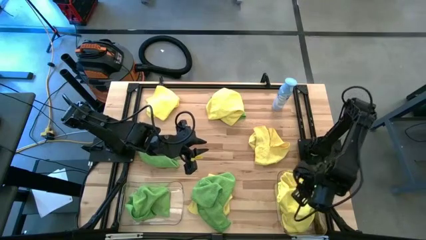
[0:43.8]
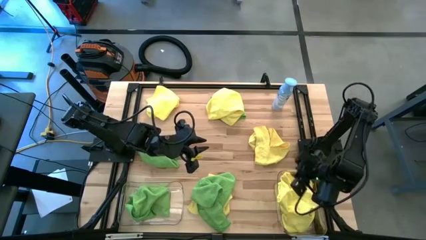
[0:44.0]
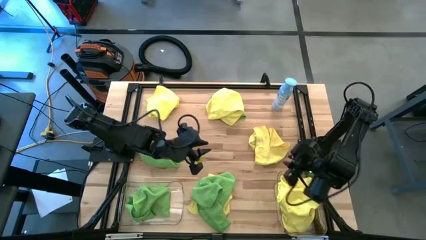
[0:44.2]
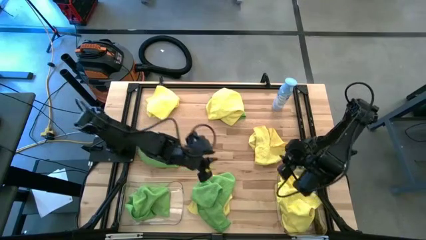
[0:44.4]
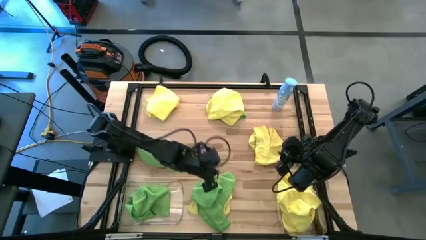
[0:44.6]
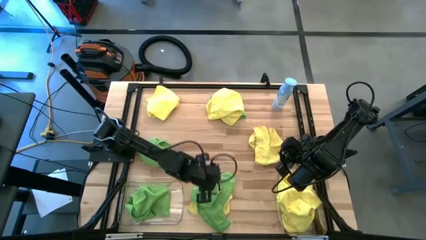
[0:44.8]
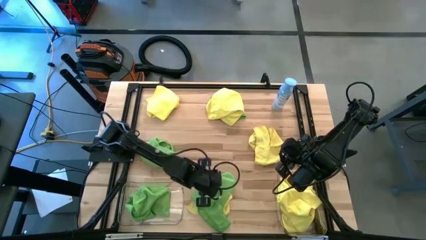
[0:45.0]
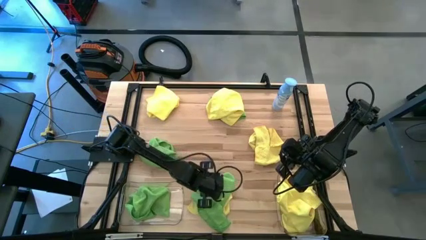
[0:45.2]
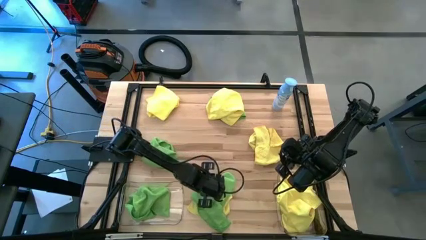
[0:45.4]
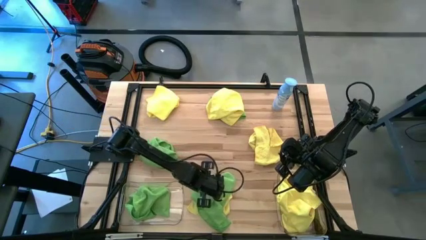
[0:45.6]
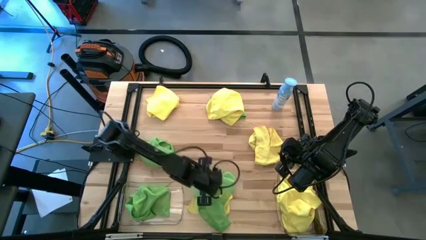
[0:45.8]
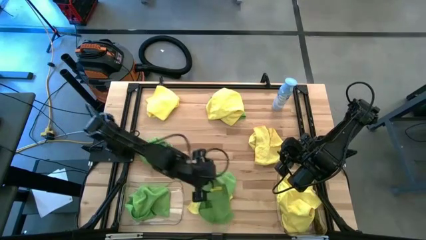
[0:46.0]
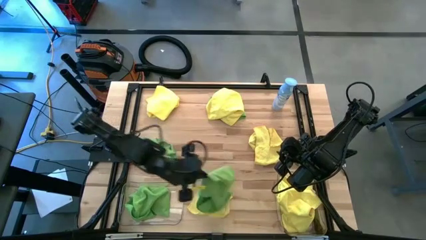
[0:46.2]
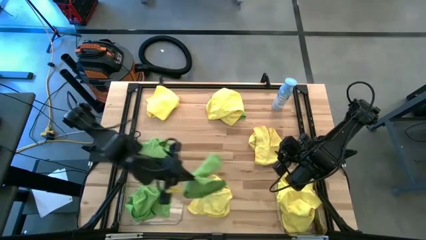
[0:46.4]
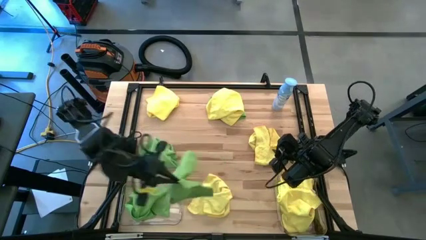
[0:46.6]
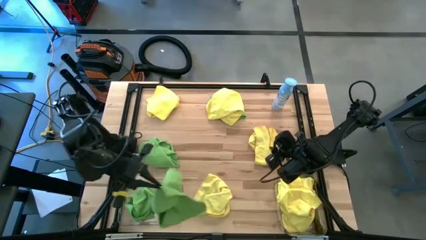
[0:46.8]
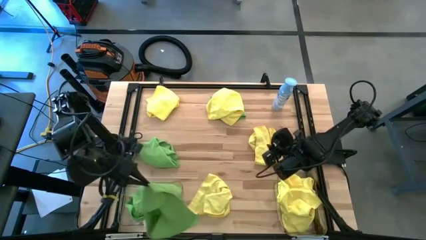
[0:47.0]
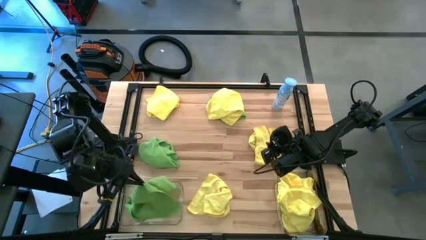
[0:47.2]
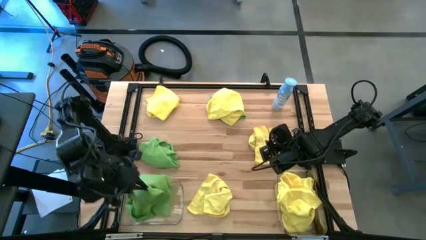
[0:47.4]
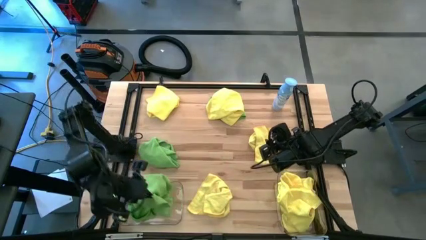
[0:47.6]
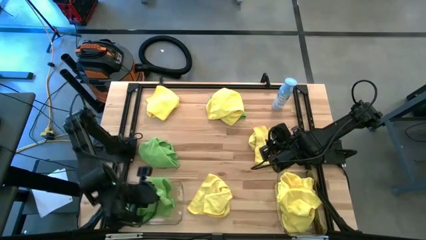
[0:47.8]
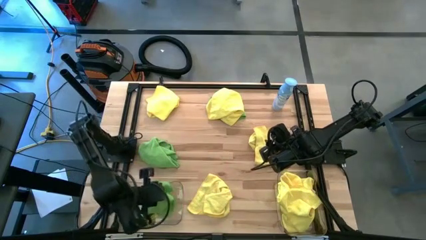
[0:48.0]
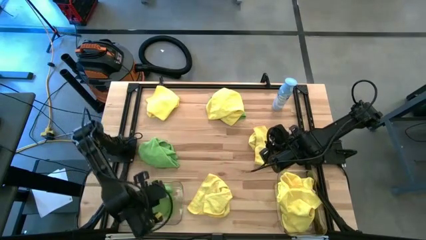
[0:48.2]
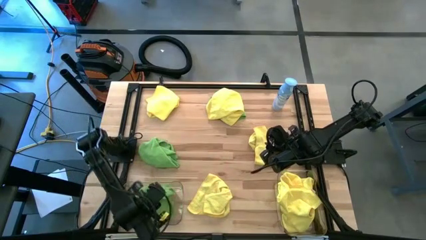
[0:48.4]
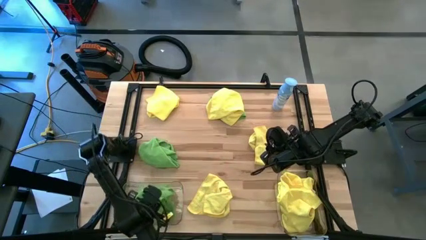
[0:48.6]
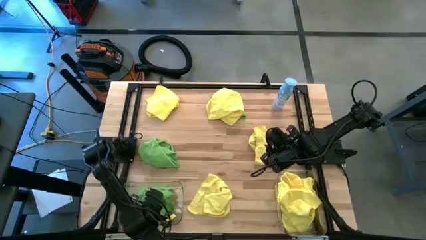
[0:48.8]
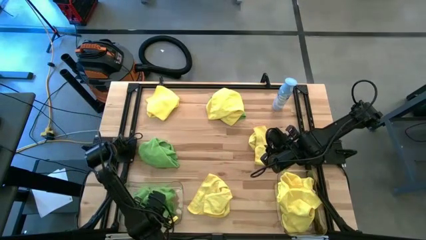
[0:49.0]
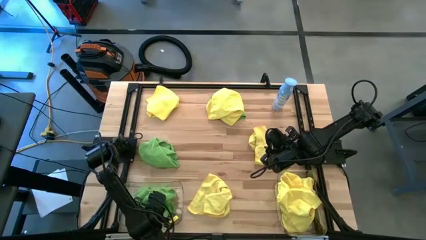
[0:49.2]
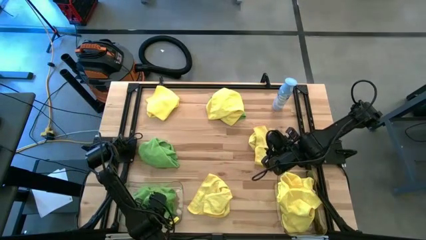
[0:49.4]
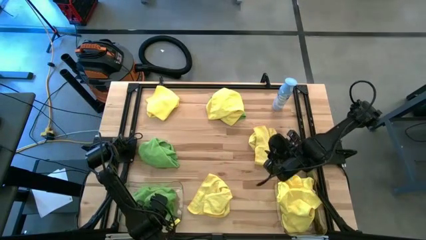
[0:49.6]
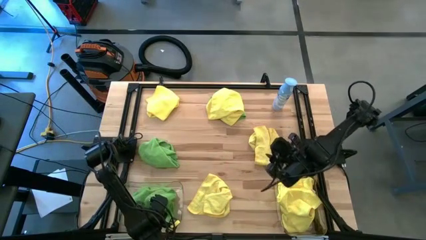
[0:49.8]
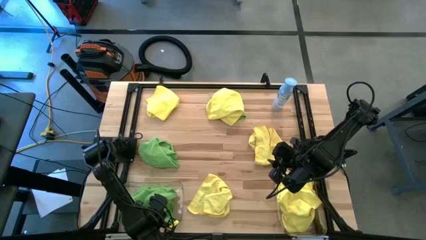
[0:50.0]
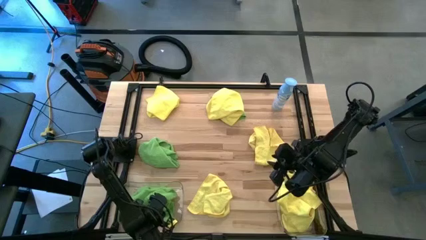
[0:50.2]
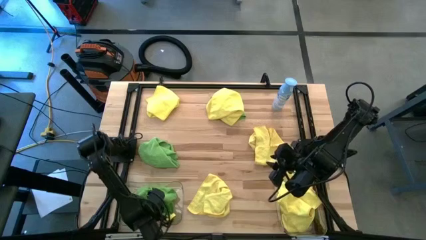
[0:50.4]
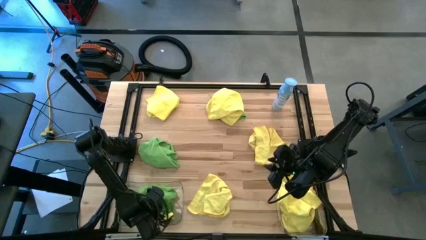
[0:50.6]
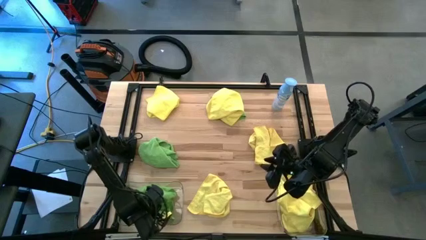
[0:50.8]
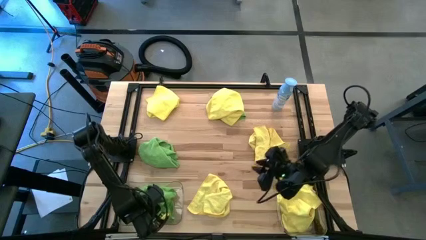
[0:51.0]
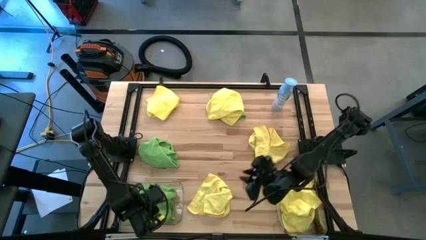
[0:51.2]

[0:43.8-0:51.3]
Task: Sort microfiber towel by color & place in baskets
Put the bottom center green microfiber towel into the left transparent bin

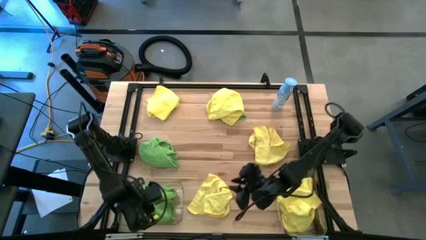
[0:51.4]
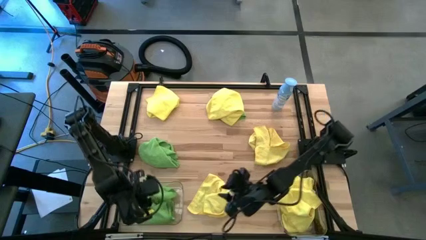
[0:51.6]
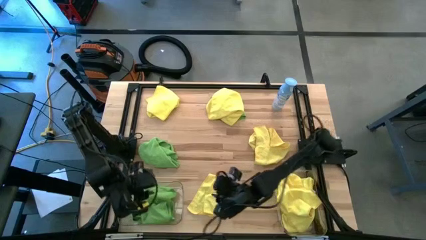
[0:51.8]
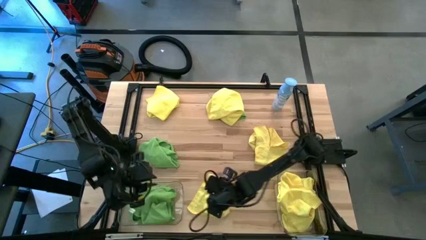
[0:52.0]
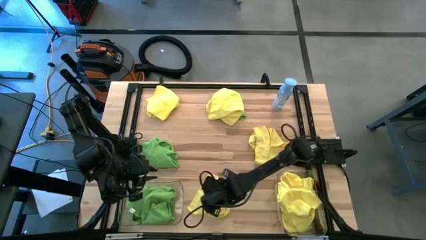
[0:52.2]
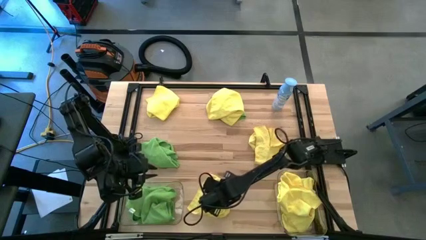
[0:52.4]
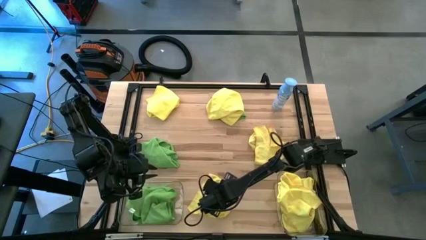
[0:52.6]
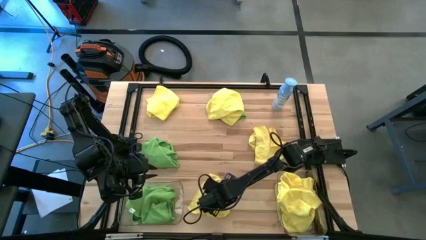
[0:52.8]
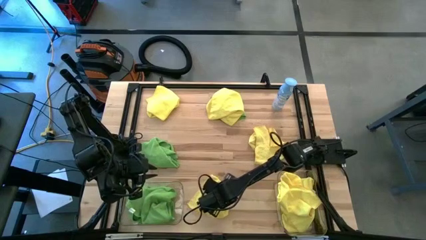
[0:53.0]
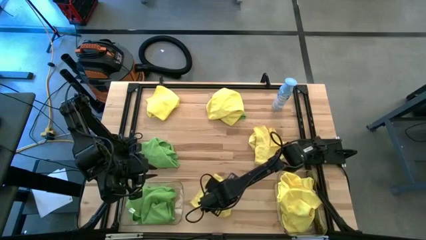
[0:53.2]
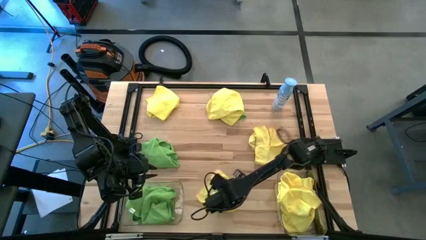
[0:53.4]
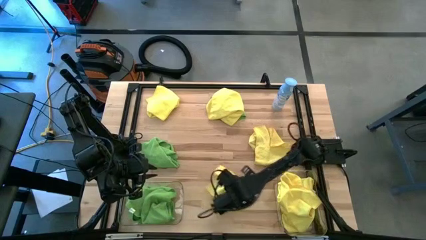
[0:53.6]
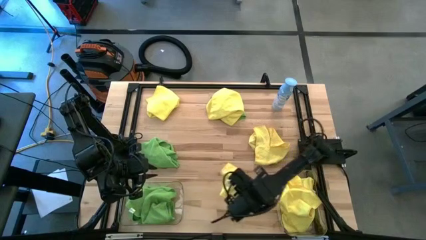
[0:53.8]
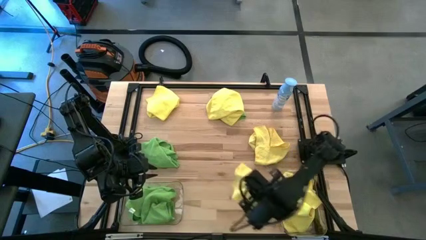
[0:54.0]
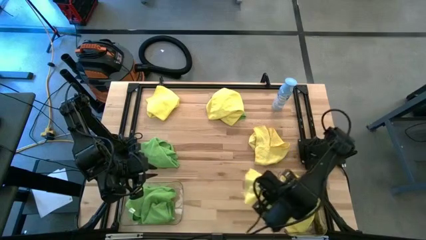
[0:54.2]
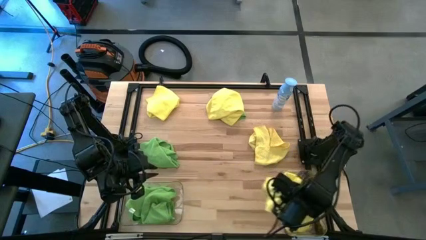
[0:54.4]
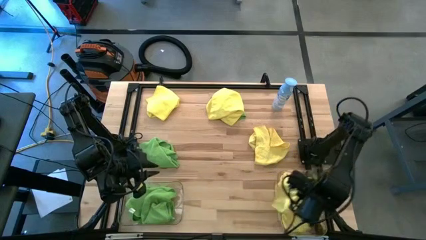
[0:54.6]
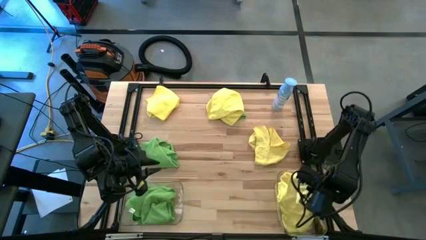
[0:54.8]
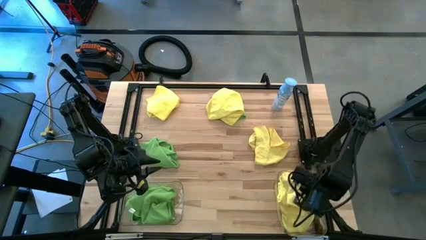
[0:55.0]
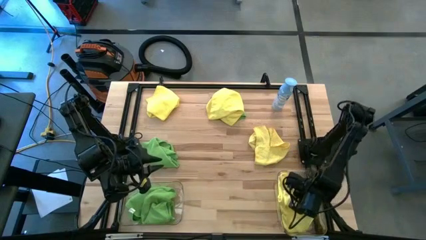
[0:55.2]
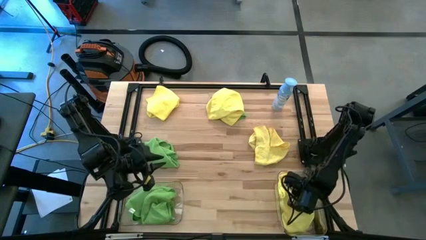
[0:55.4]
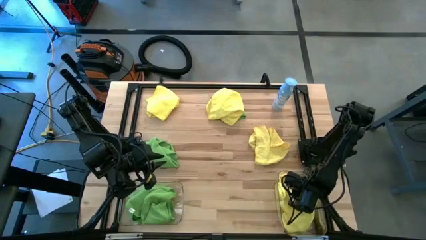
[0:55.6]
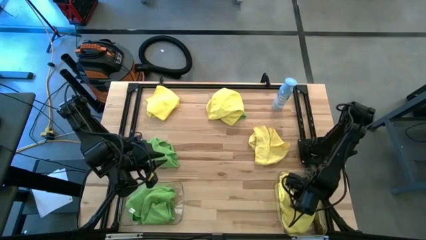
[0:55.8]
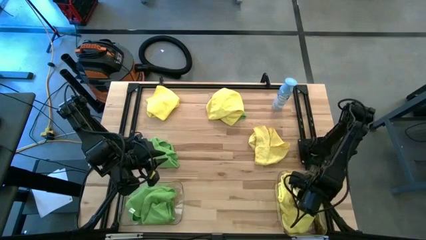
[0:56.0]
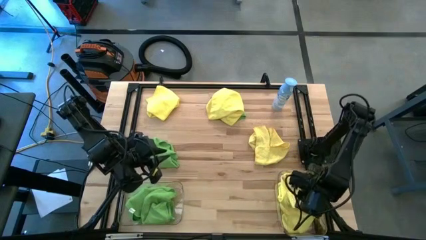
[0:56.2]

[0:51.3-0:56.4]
Put the bottom center yellow microfiber towel into the right transparent bin

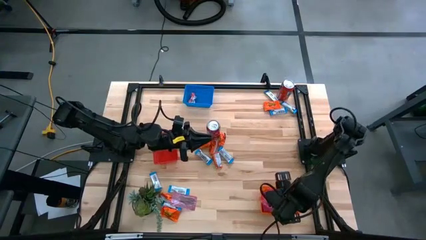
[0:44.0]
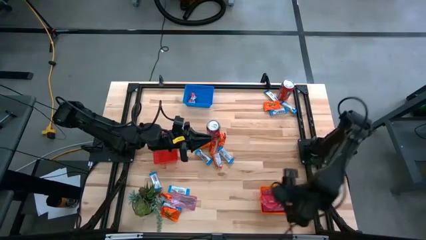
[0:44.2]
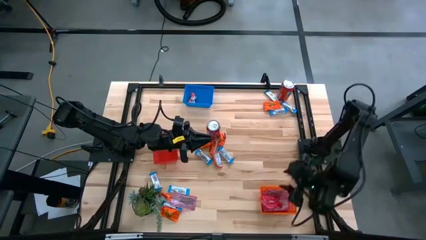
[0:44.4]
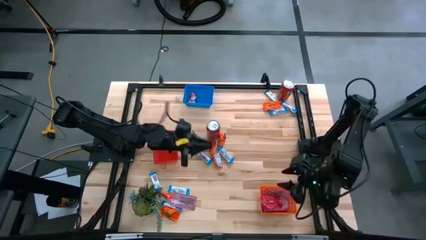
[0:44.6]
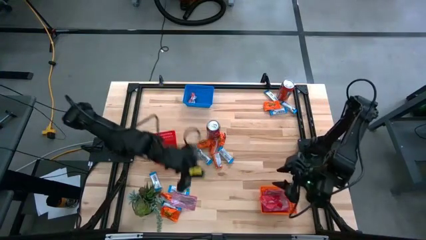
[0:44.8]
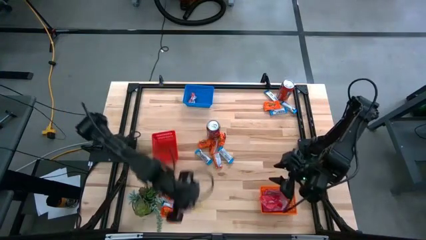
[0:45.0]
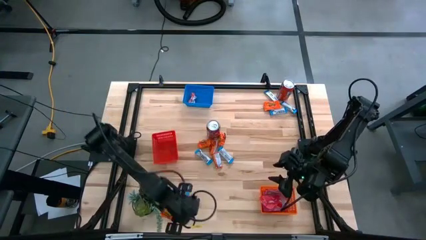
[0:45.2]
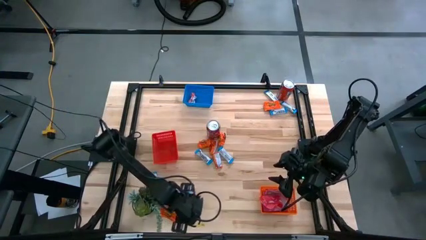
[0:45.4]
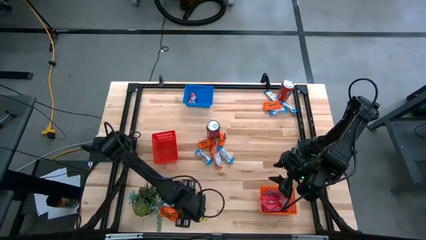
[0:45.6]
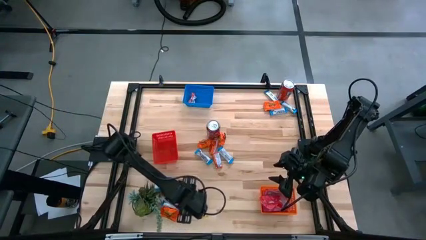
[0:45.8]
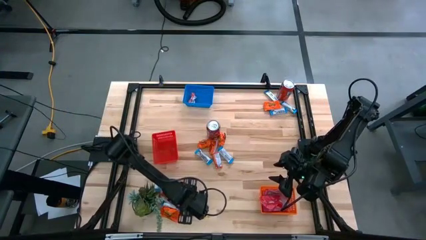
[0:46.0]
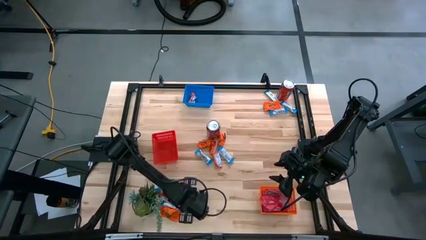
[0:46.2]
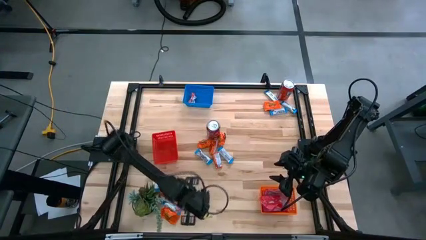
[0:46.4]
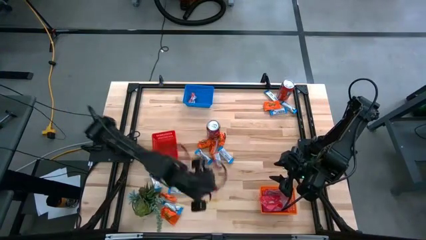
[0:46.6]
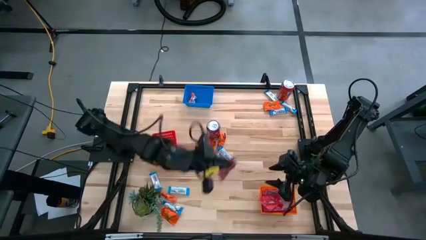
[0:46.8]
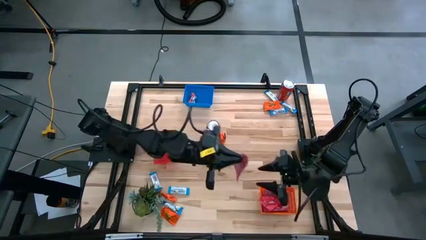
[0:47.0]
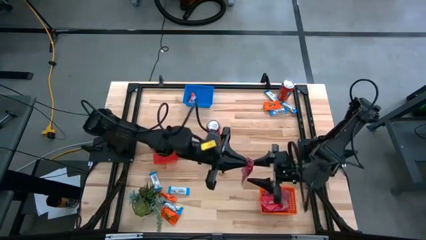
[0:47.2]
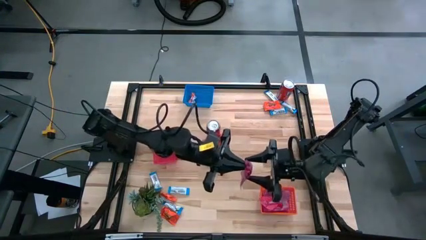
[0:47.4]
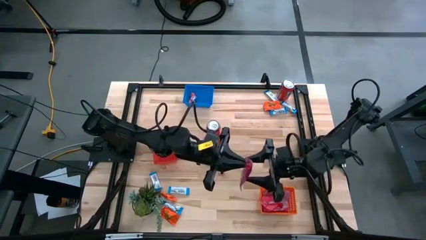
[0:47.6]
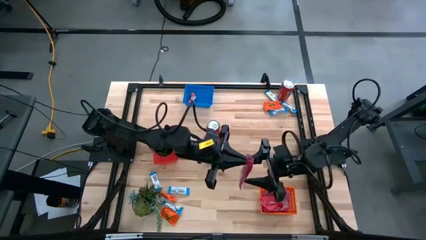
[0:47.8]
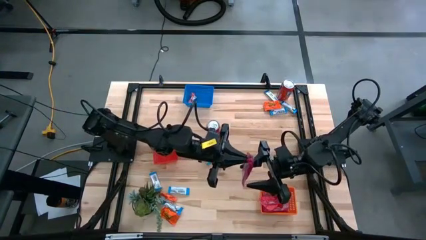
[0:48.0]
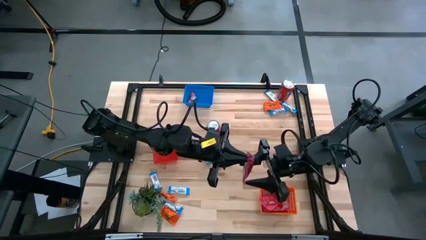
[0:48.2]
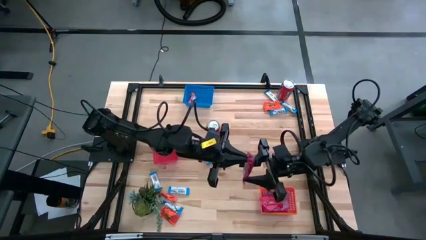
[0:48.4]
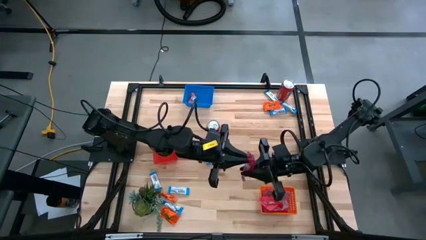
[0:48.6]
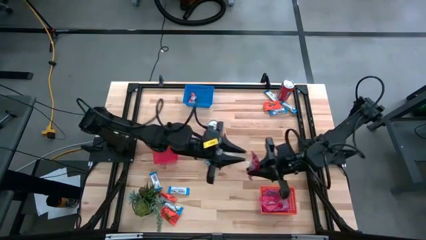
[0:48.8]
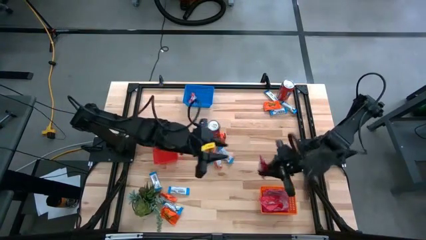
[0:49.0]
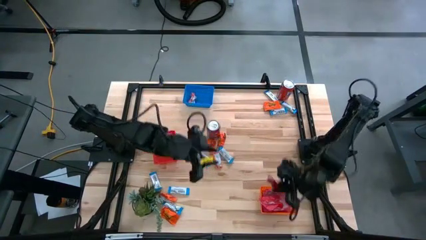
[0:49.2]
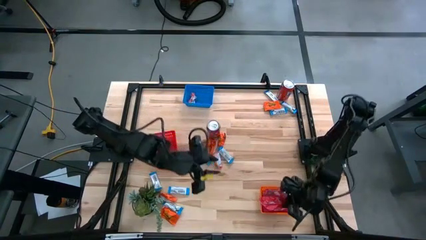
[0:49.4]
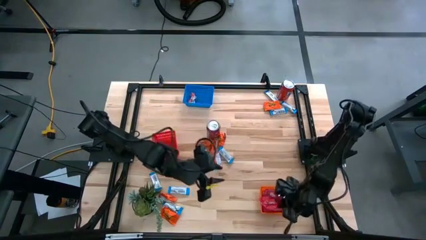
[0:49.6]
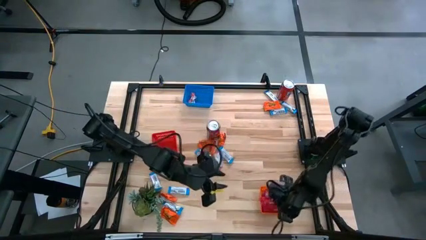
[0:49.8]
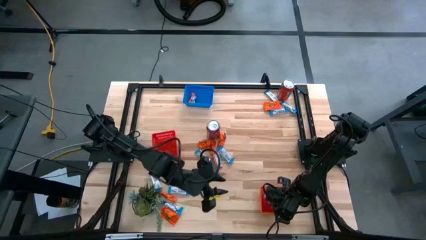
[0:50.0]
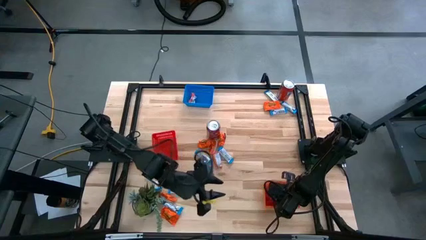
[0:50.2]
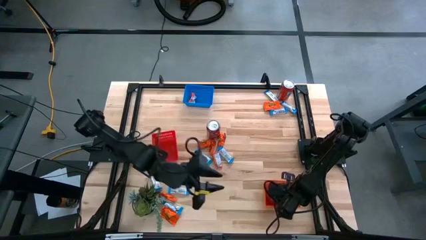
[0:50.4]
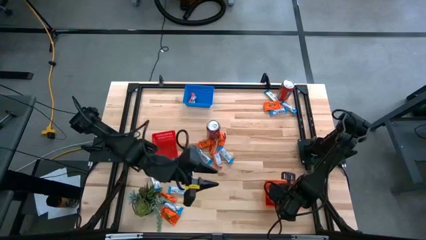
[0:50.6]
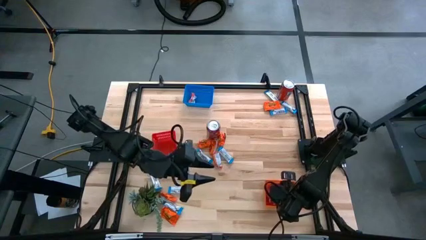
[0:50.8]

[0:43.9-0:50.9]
Task: Sort candy
Put the red candy into the orange bin
